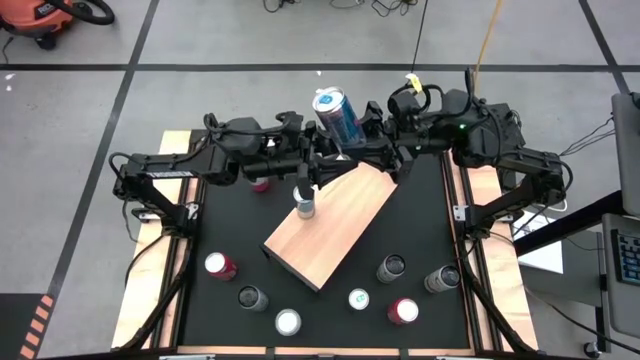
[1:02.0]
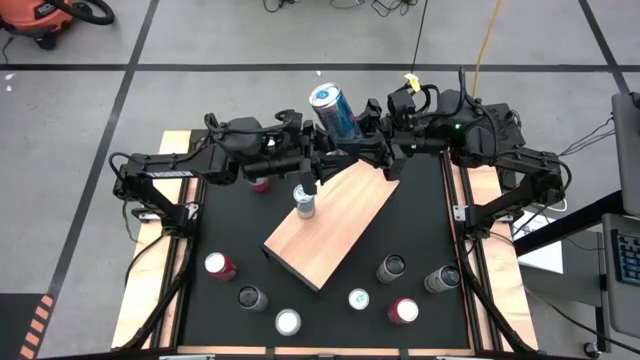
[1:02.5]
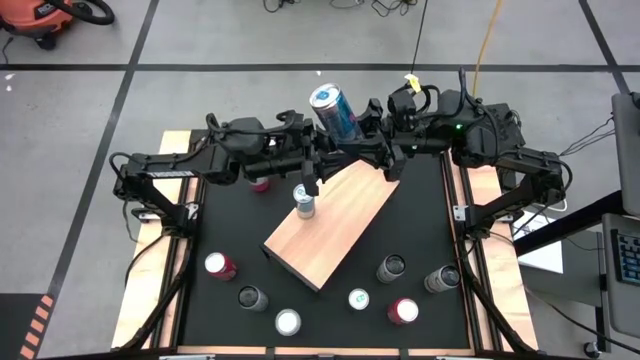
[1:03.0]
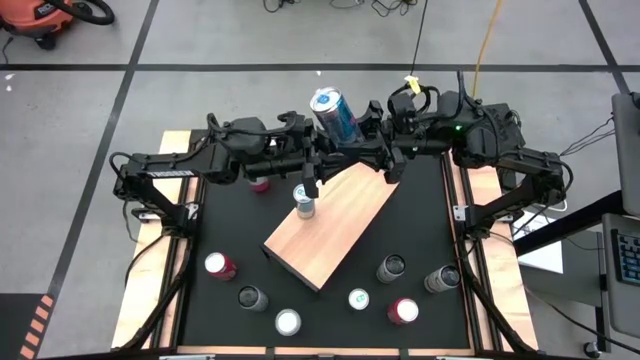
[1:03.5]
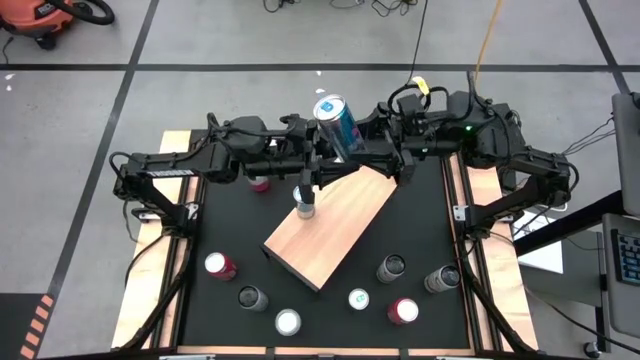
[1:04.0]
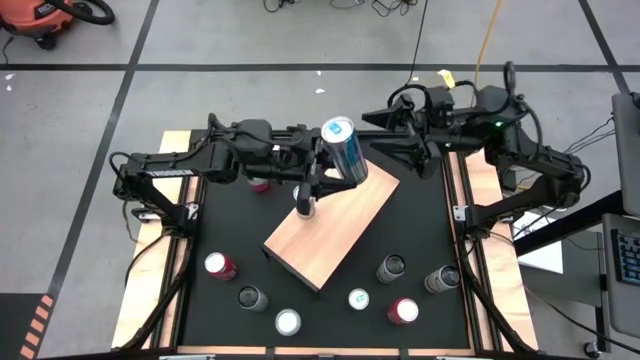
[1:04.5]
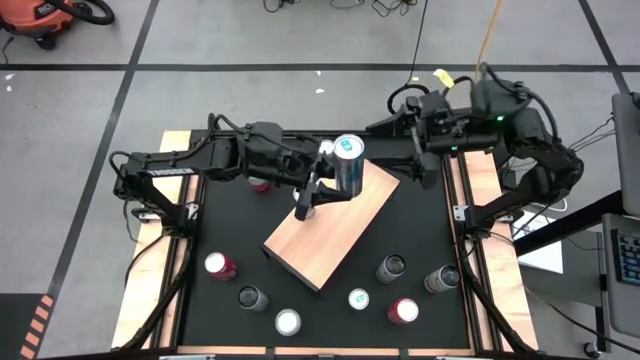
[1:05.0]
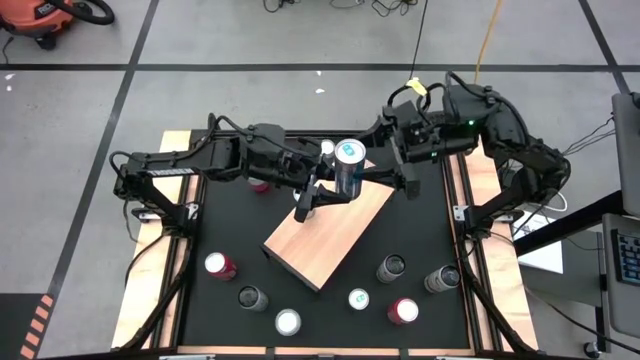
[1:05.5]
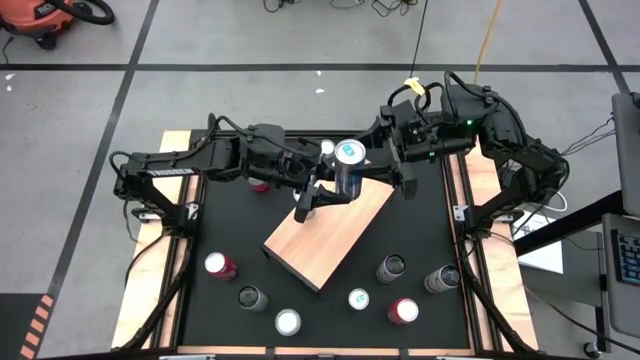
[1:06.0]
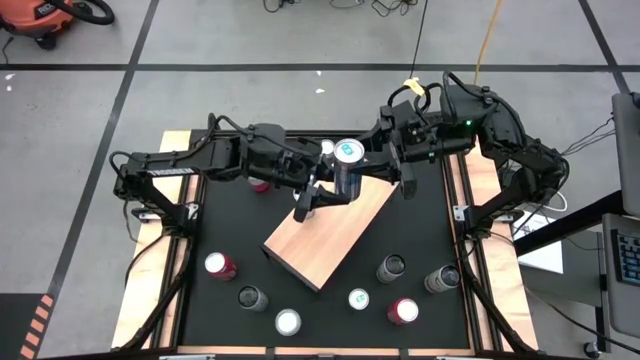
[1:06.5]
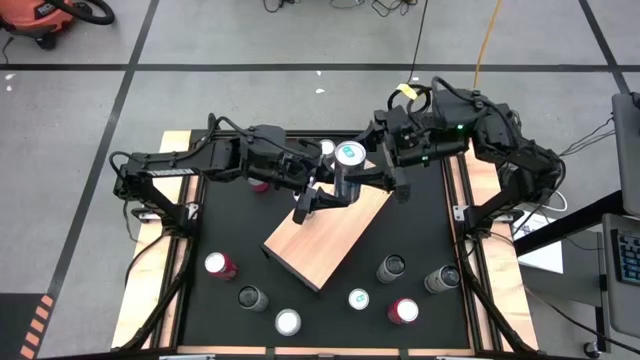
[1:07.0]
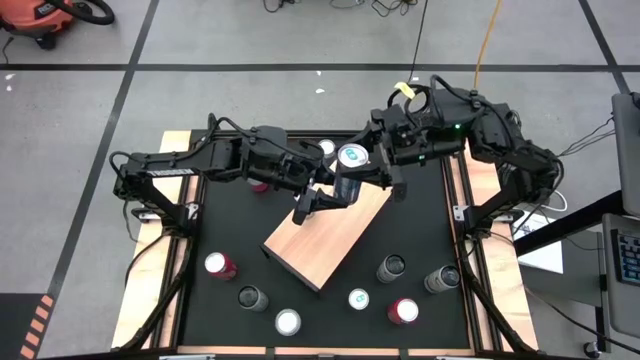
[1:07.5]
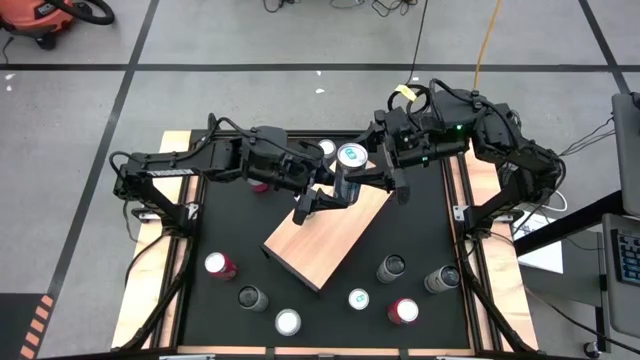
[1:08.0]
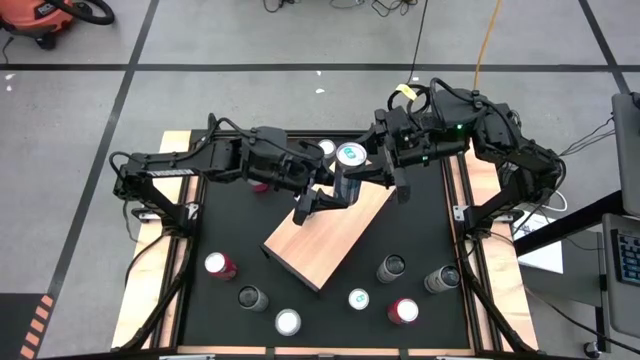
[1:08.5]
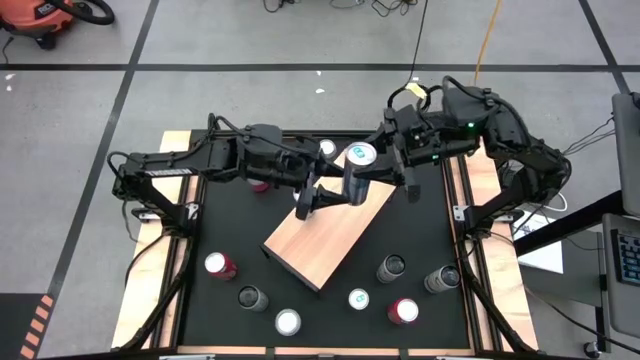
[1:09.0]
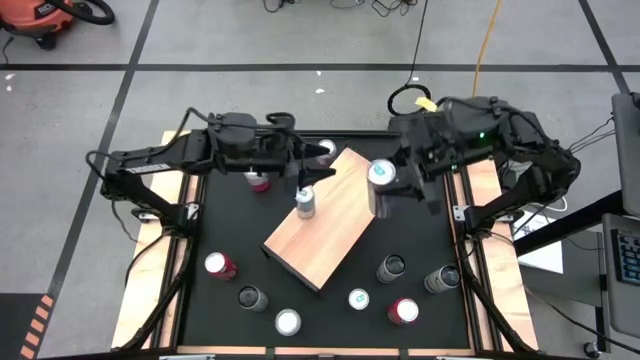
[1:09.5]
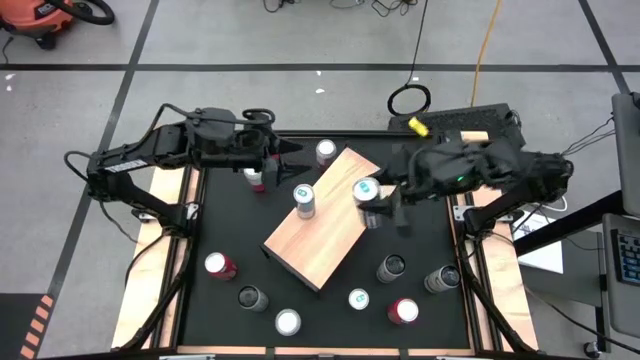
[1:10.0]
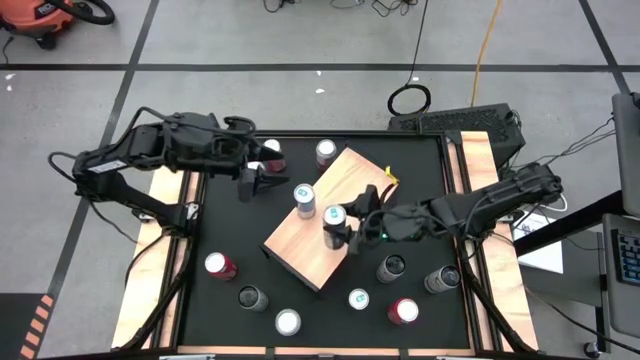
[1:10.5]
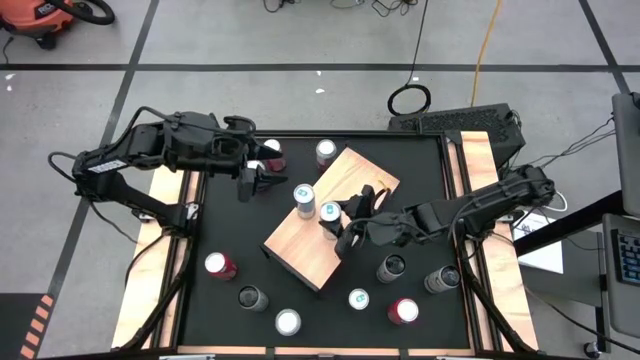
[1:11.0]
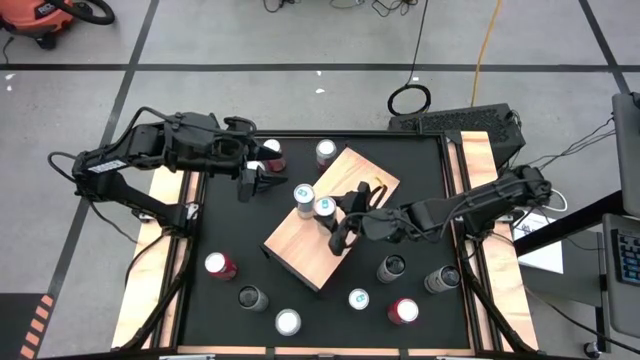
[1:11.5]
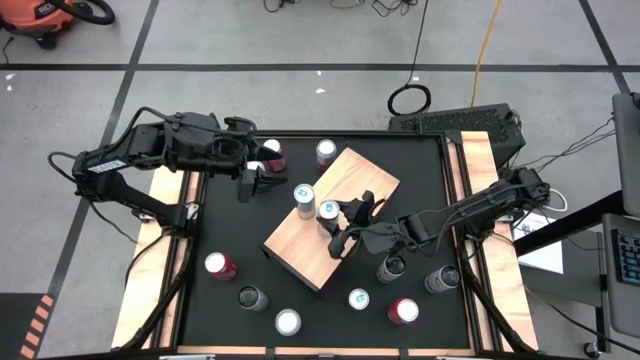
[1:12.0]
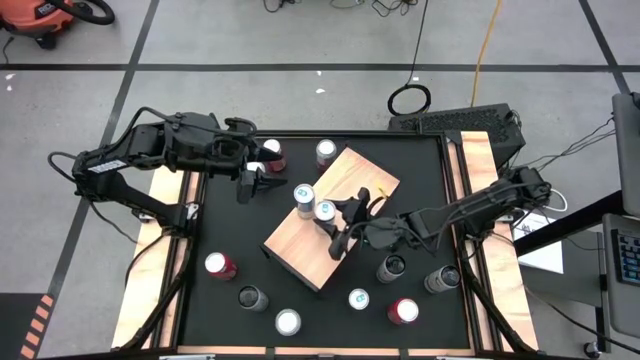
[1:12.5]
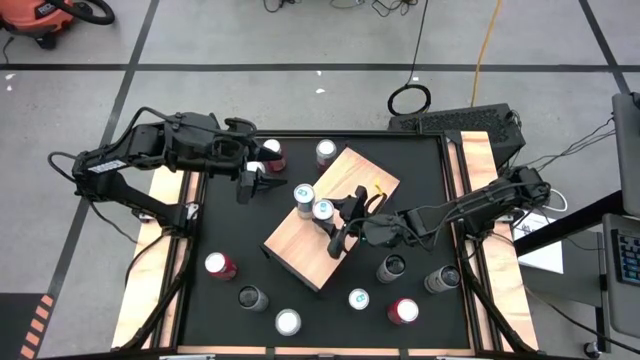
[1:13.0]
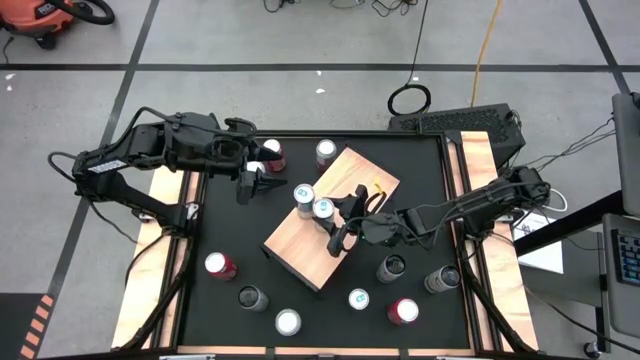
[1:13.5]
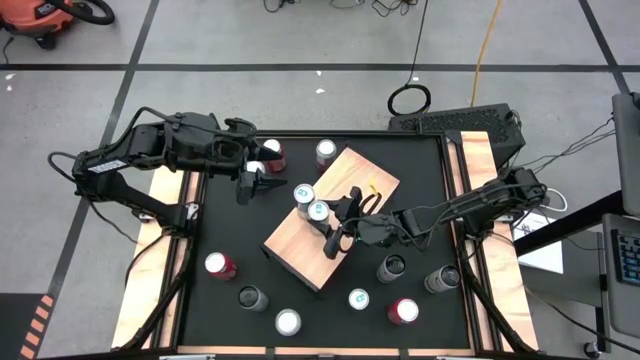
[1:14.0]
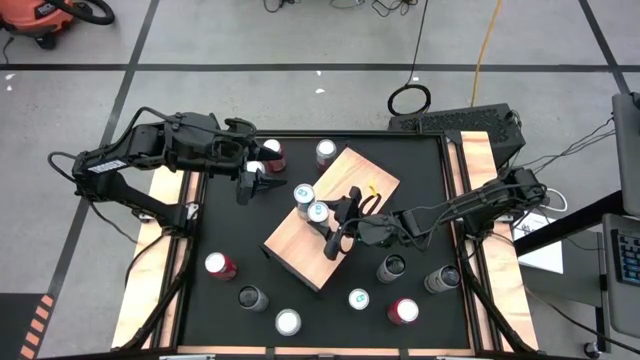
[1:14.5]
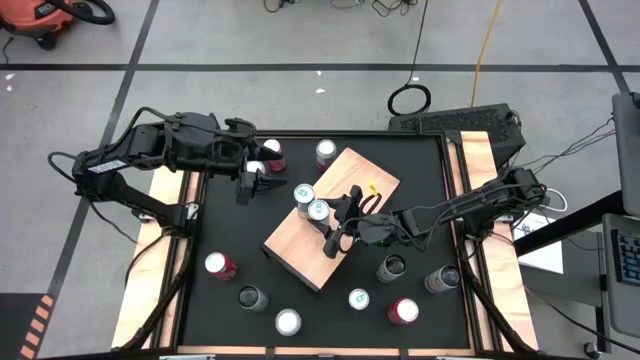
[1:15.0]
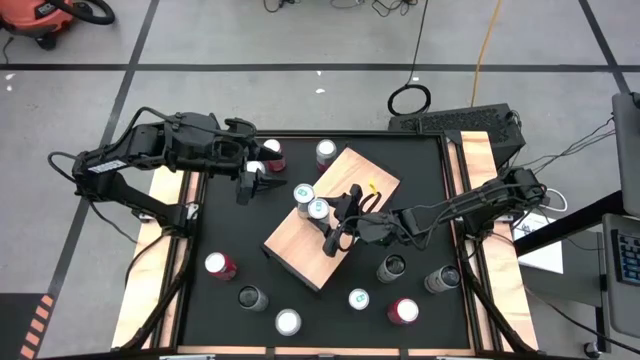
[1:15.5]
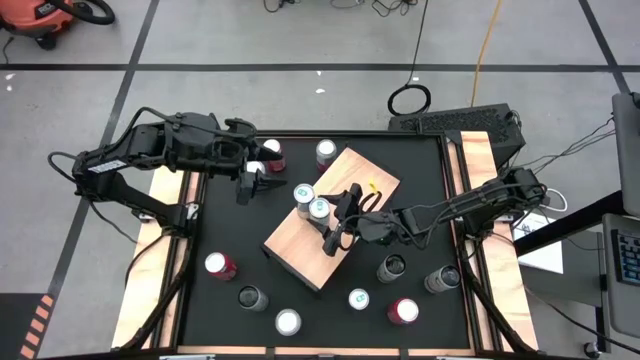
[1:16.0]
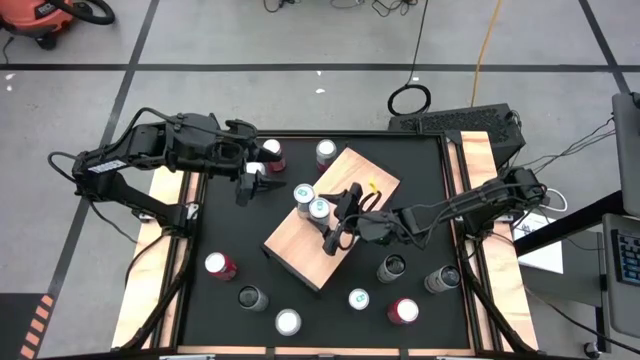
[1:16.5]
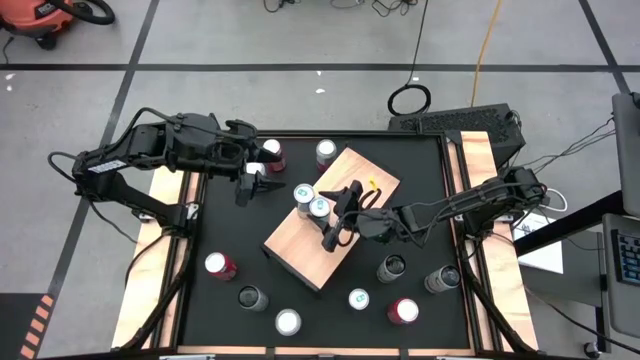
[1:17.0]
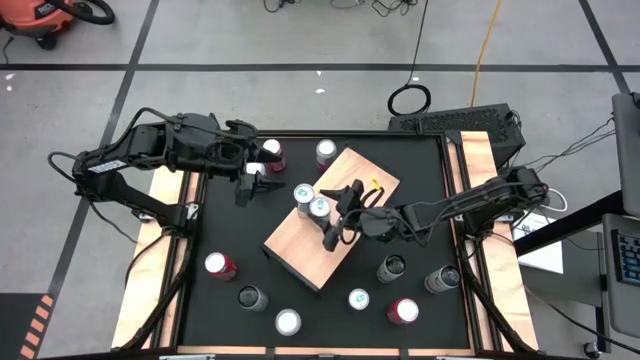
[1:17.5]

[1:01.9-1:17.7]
Task: Place canned beverage on shelf
Put the top blue soda can on the shelf aligned with the blue soda can

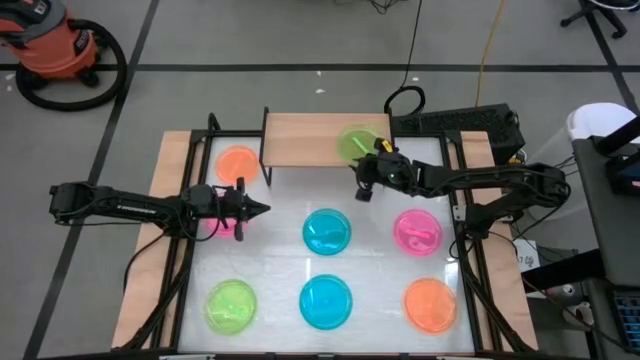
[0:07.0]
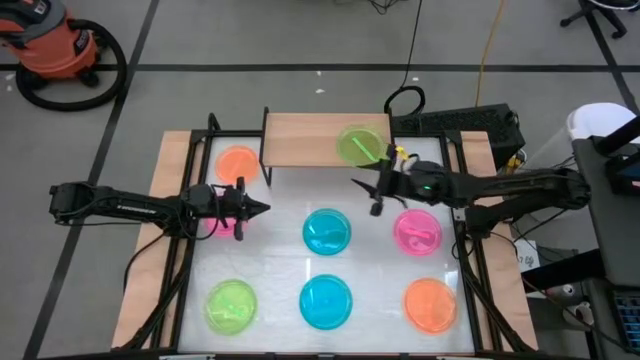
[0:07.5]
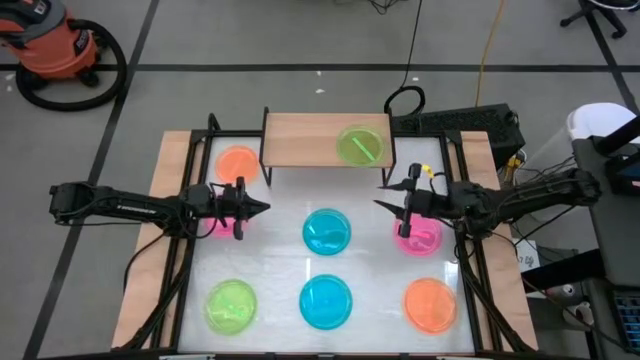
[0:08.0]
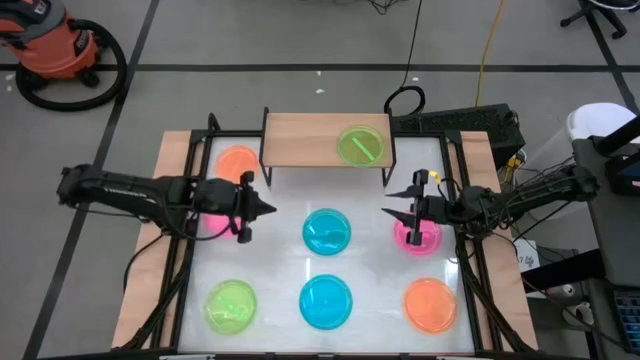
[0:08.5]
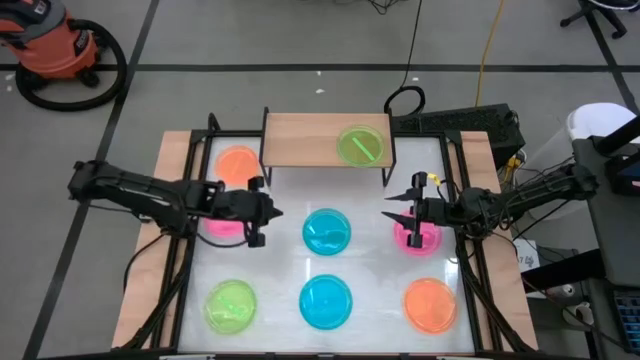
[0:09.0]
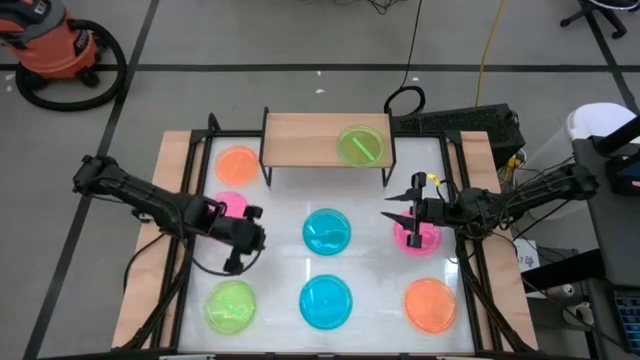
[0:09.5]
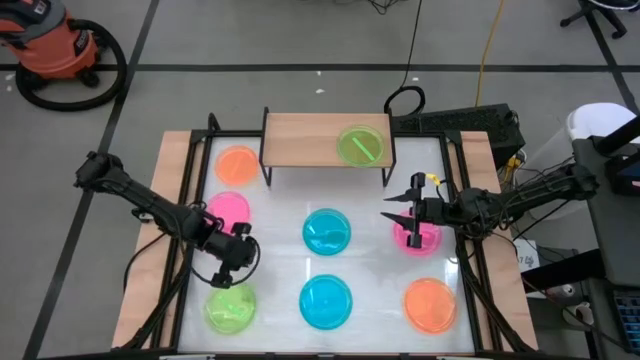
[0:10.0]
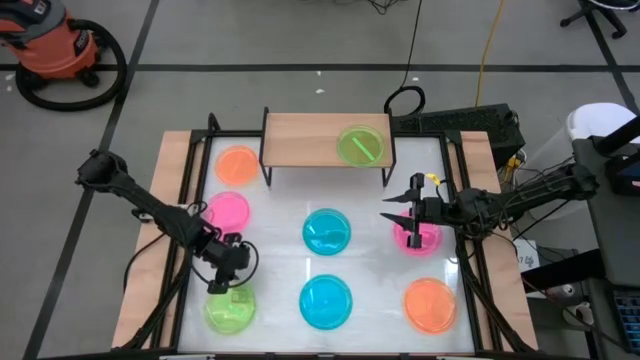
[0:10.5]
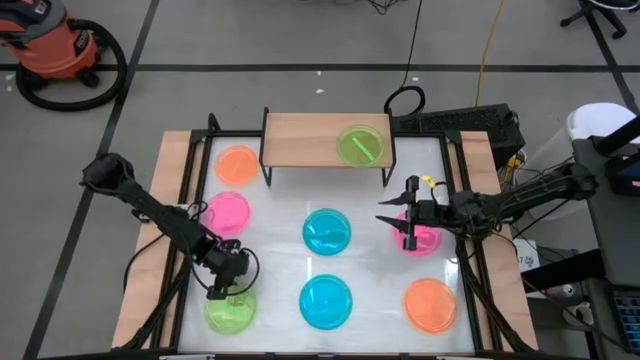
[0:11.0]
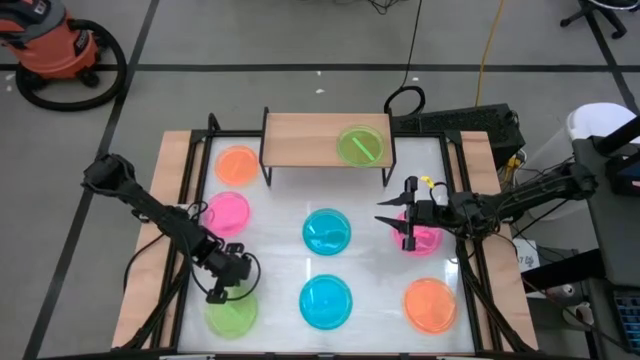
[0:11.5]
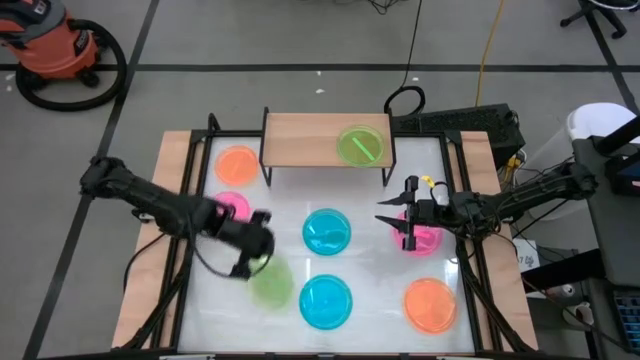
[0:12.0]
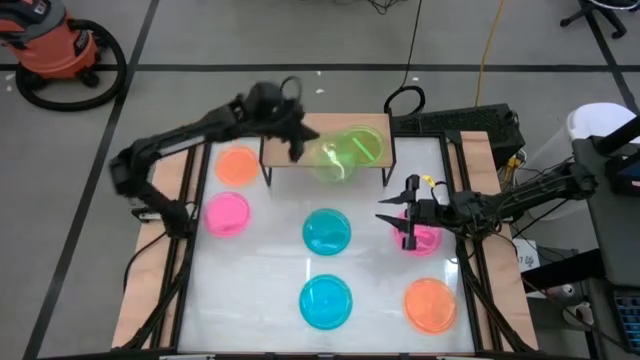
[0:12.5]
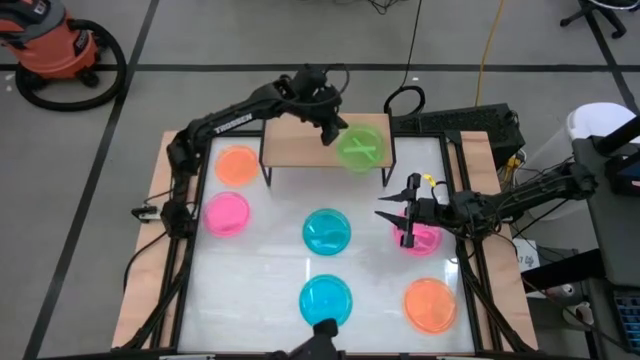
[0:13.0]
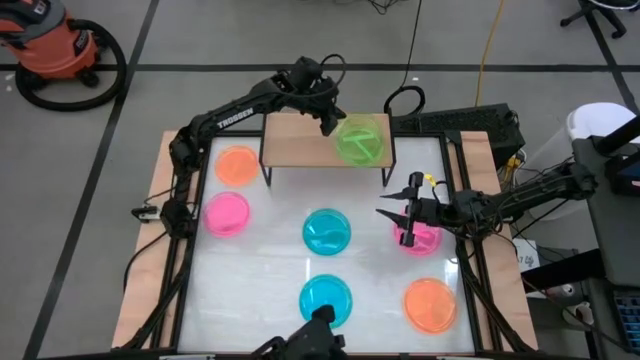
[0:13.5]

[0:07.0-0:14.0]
Task: Place and stack plates onto a shelf
Stack the green plate on top of the other green plate on the shelf
